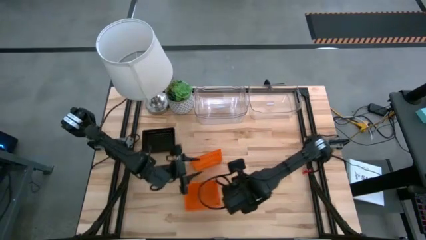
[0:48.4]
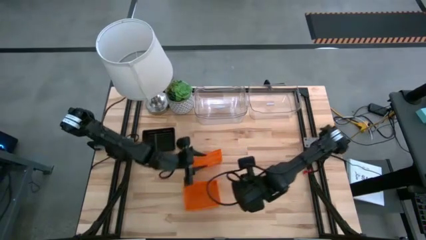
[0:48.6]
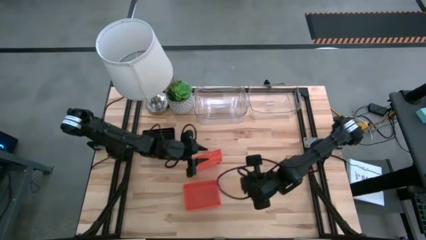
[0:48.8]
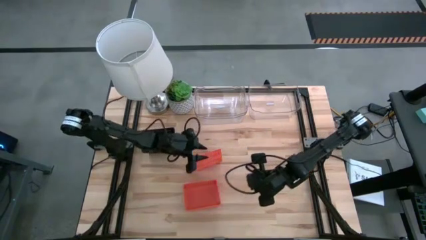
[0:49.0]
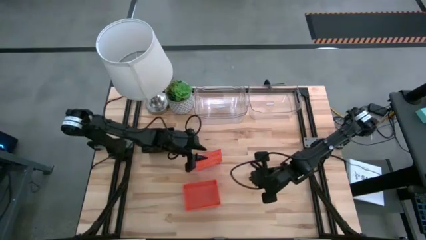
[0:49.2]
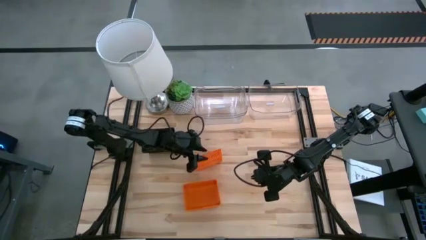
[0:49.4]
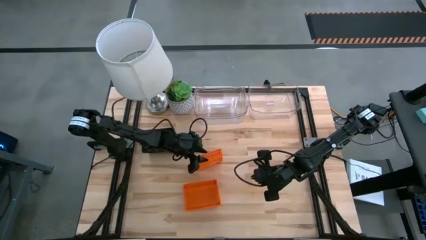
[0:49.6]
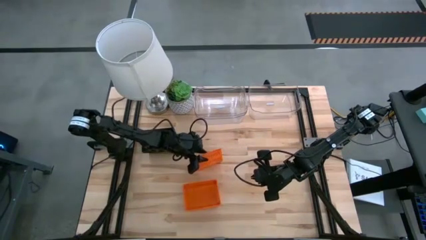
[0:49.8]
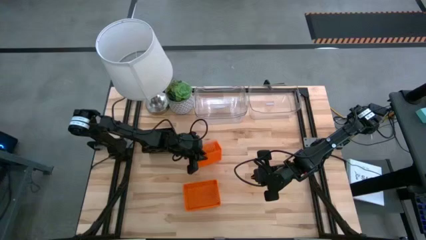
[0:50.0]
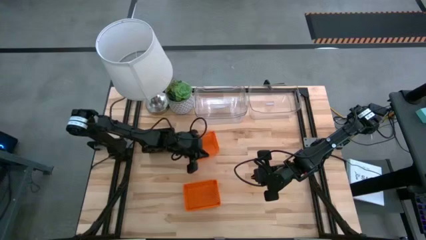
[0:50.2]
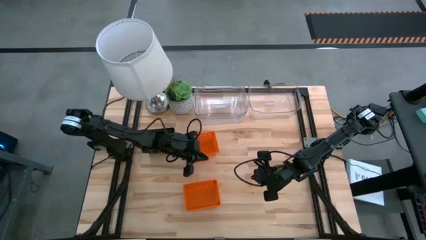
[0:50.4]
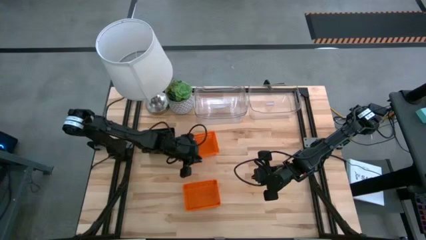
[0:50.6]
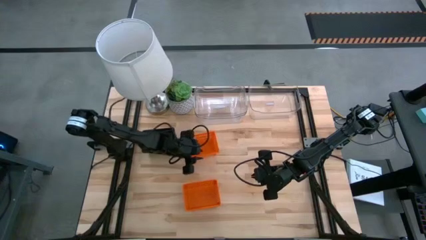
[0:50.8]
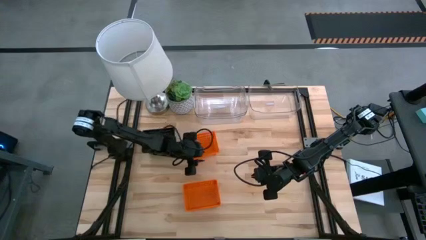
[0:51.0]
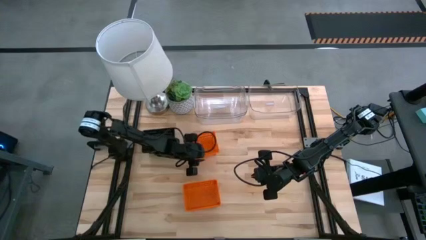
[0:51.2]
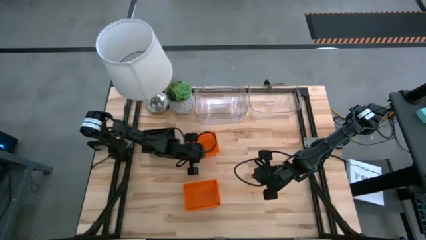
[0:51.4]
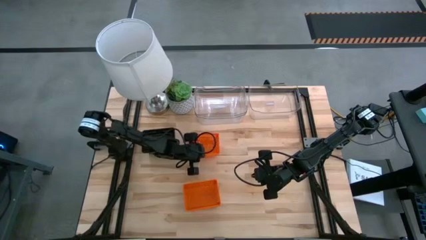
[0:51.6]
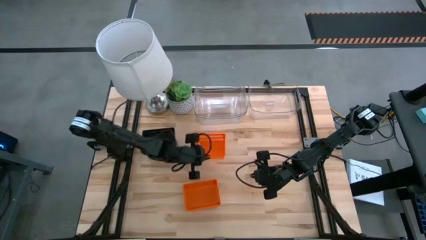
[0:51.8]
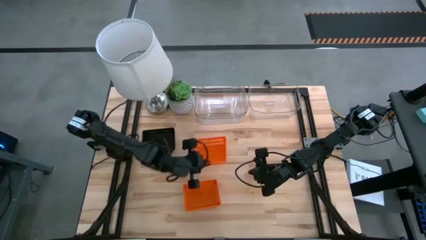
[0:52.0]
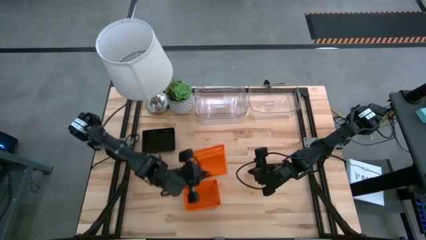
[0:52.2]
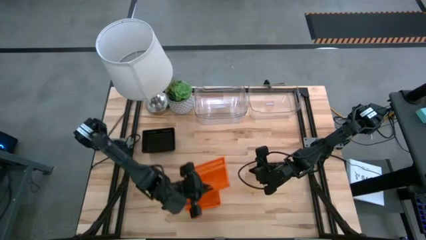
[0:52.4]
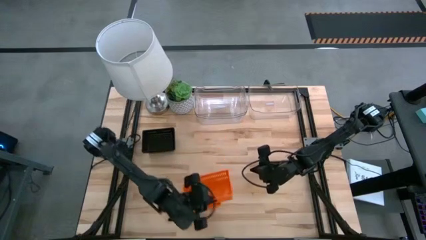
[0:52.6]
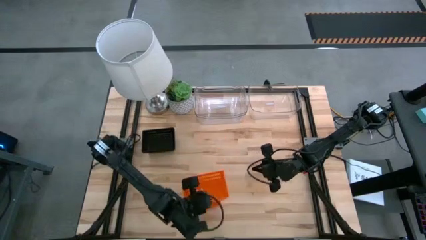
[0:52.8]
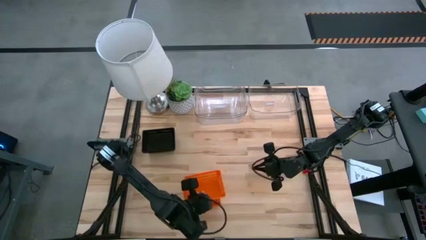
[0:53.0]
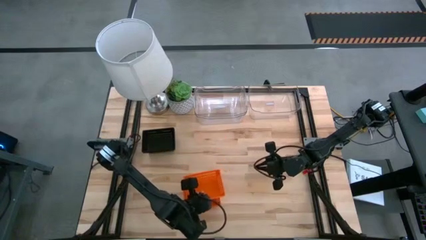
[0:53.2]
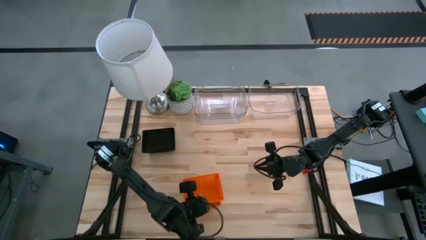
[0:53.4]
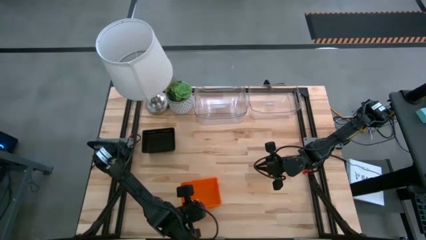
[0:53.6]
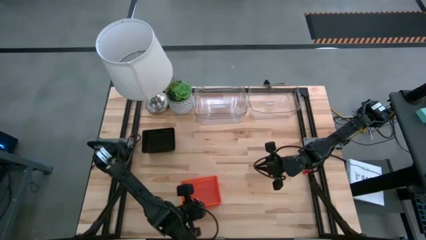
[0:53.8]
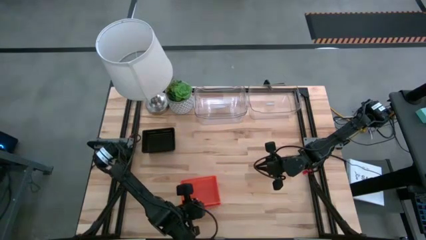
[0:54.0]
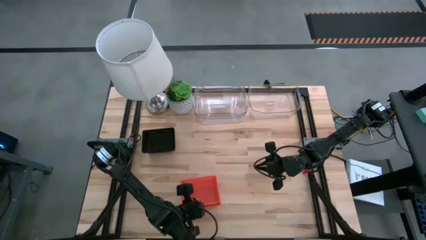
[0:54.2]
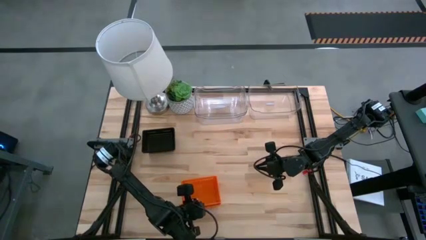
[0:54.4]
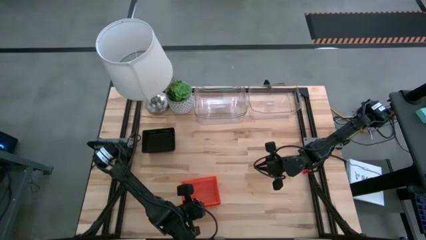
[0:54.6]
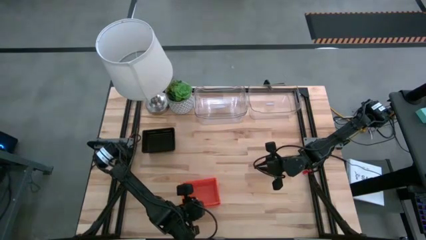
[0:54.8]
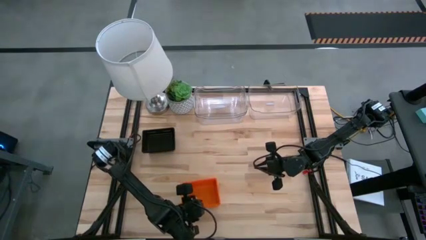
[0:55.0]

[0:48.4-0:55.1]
Stack the orange bin on the stacked orange bins

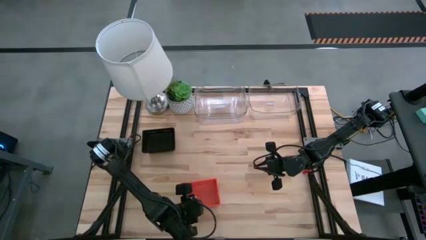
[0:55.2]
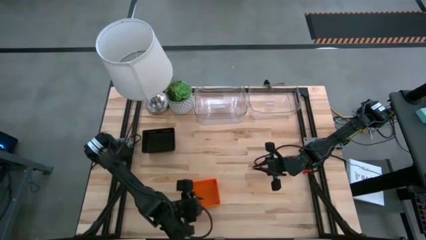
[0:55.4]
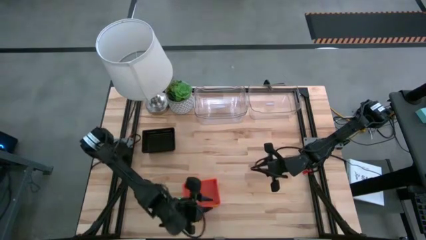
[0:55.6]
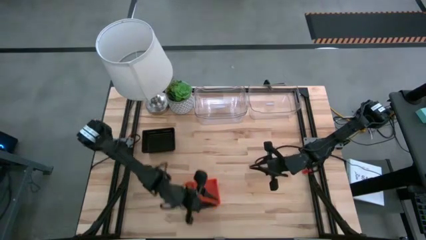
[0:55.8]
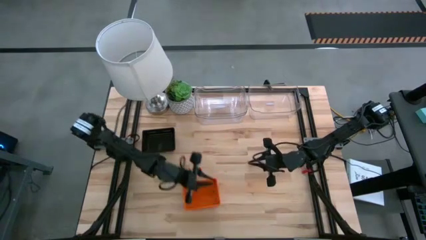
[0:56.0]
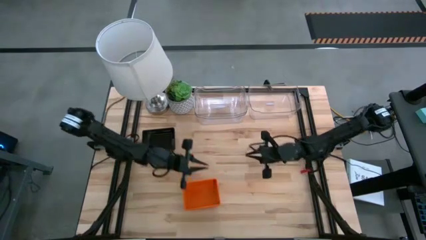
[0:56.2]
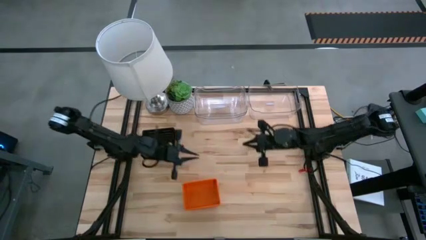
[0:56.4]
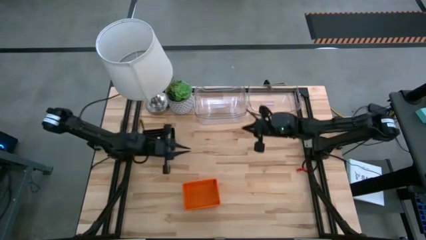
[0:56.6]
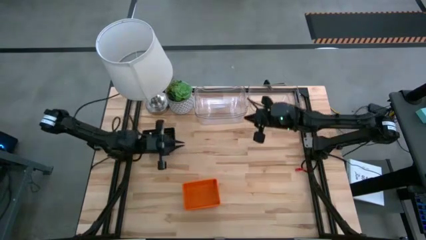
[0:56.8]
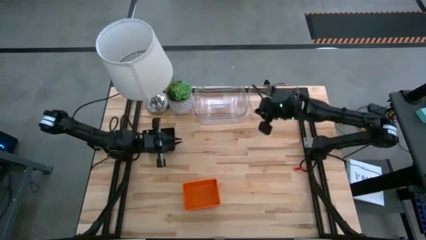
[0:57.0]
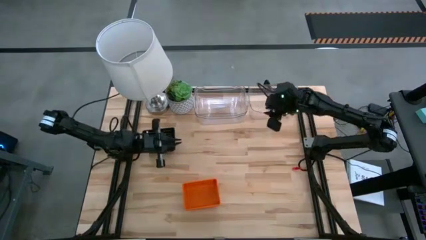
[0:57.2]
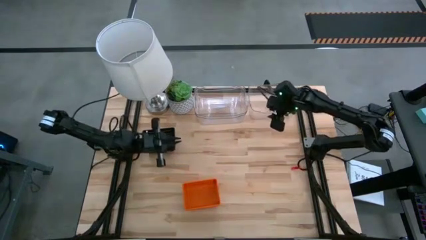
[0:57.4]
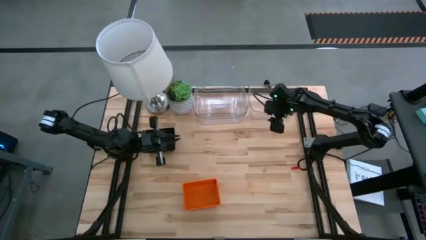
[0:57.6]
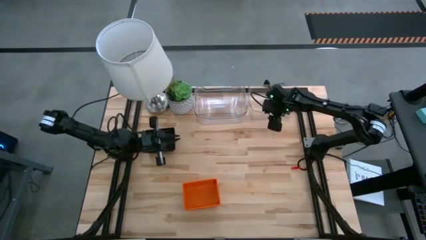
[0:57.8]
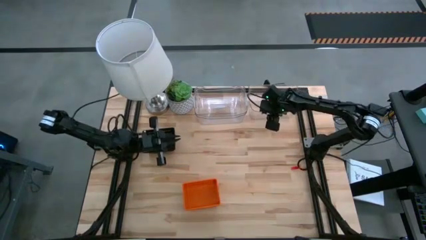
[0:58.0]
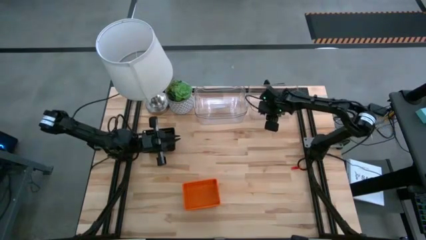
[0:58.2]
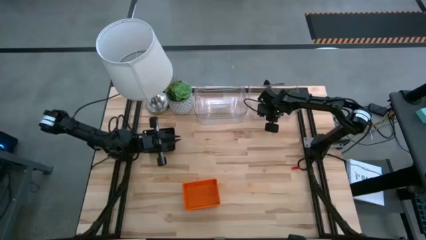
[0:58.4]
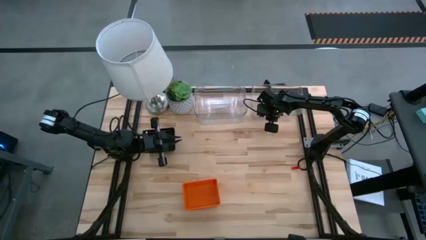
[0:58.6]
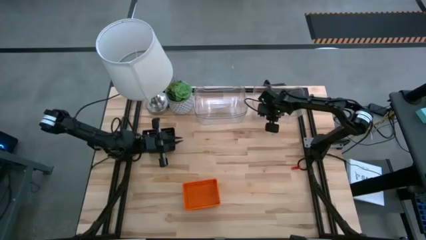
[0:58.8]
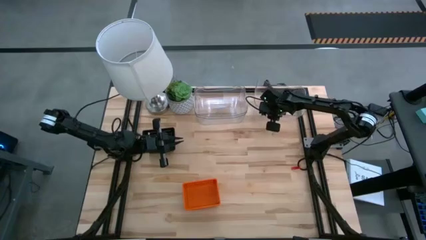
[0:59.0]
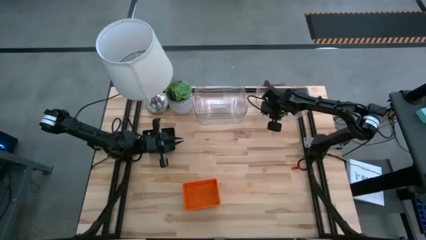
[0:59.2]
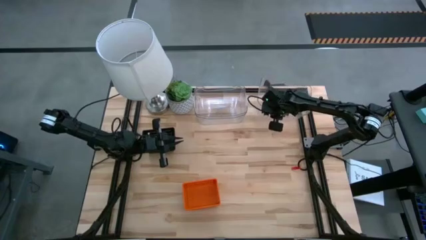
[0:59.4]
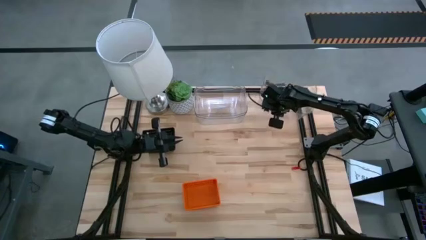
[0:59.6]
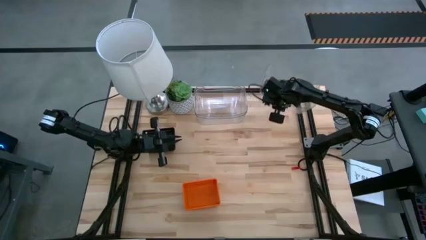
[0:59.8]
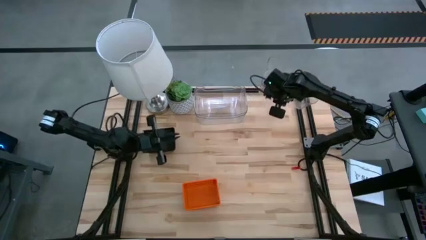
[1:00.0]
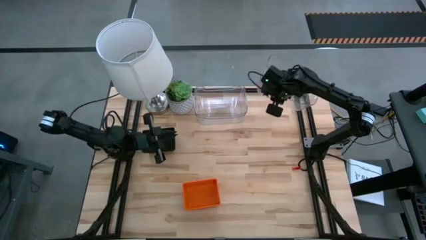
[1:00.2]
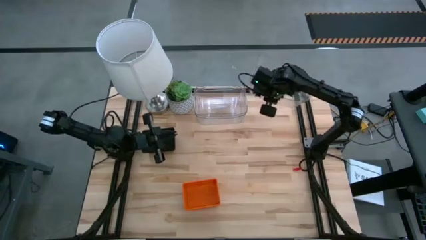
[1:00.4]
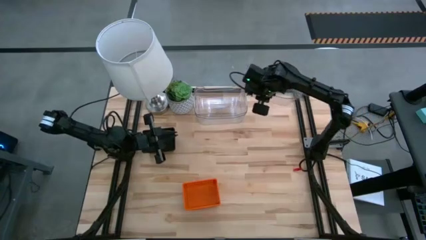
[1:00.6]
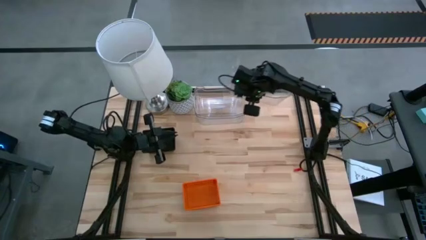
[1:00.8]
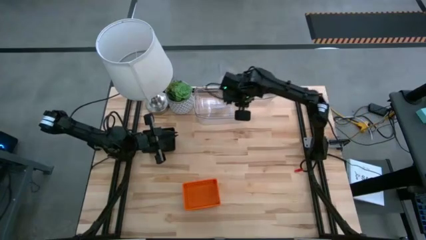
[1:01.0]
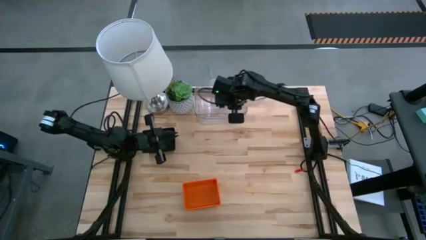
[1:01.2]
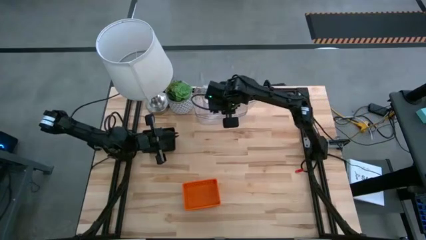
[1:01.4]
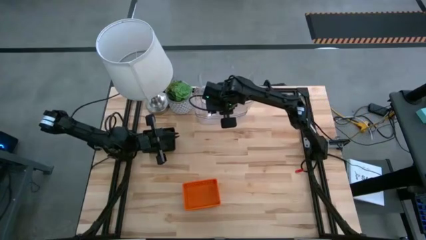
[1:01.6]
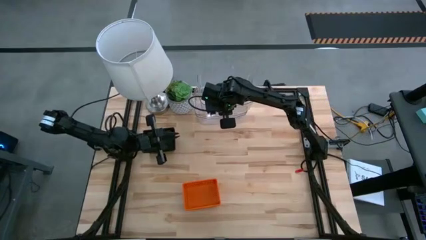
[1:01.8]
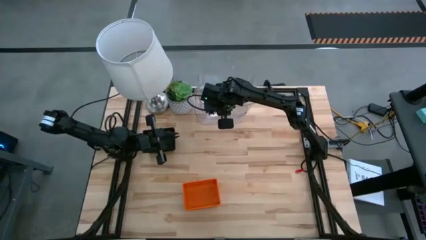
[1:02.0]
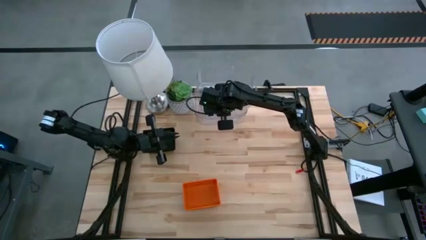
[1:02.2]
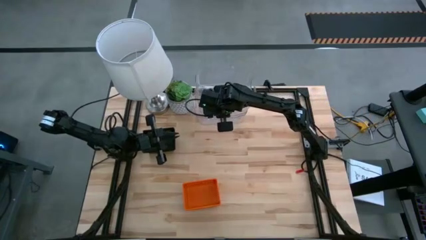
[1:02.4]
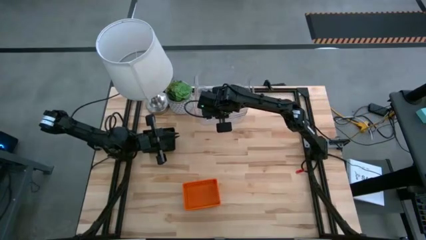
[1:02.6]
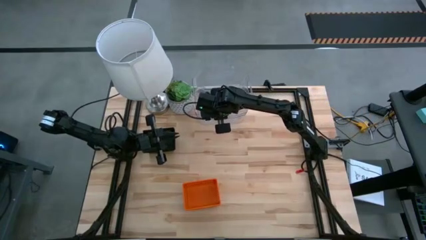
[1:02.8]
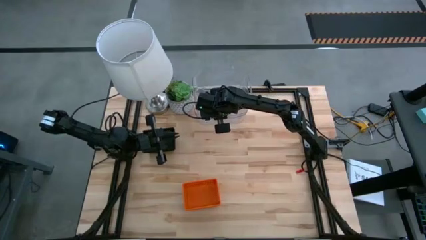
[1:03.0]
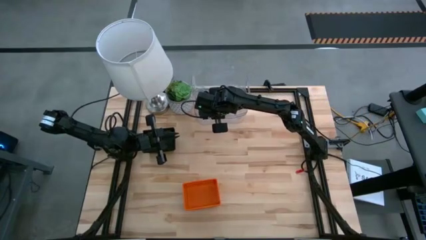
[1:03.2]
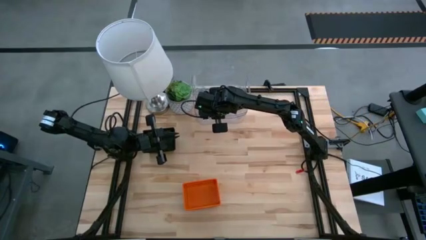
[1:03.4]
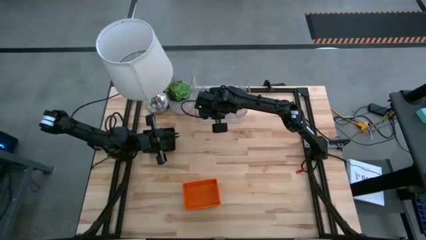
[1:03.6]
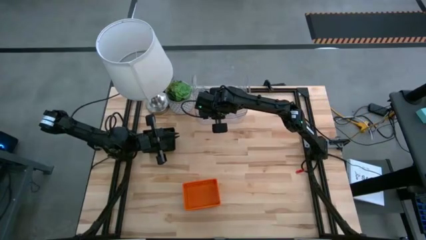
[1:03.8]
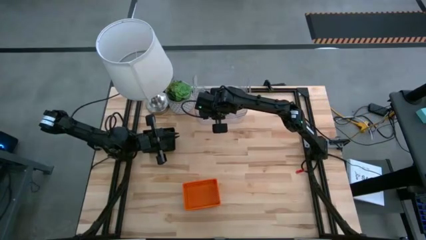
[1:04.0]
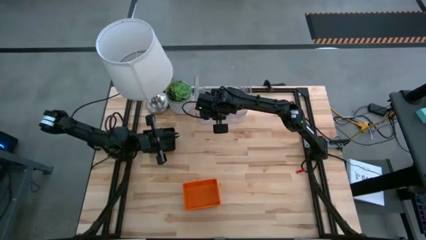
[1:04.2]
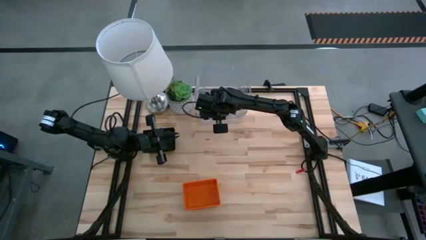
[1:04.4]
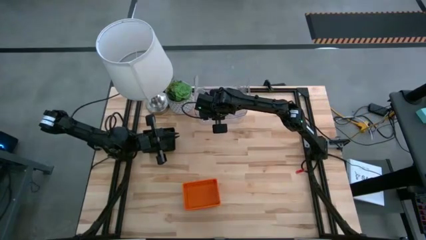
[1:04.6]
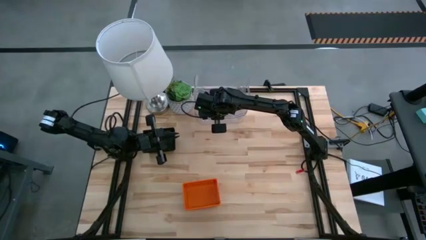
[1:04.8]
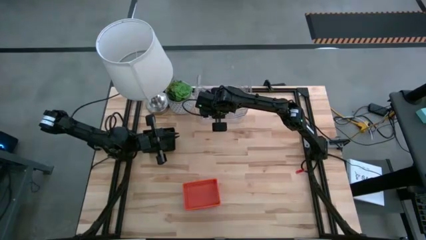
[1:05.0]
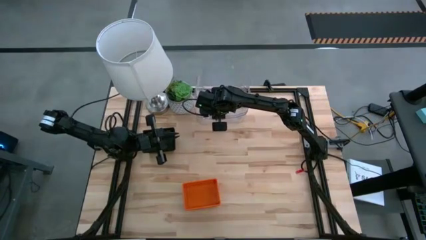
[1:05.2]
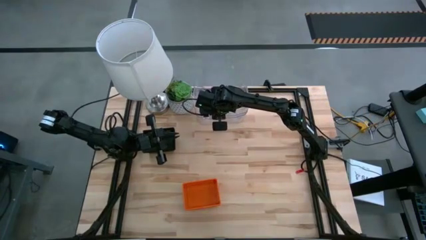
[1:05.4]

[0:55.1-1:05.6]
Stack the transparent bin on the stacked transparent bins

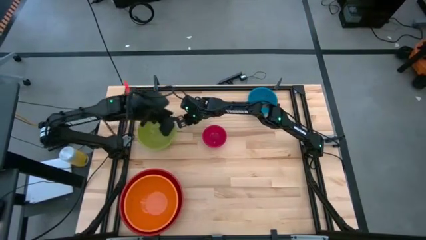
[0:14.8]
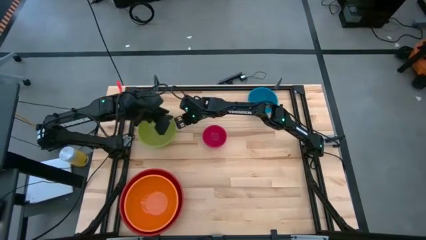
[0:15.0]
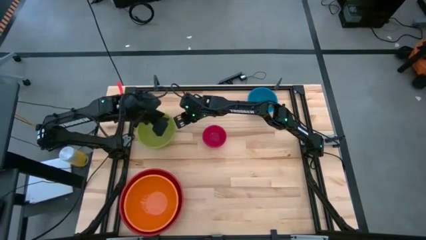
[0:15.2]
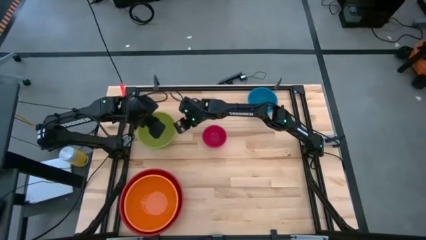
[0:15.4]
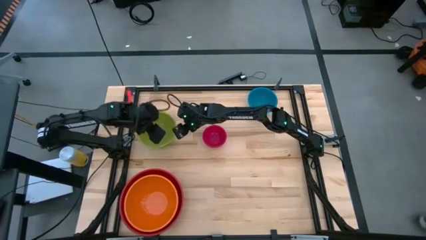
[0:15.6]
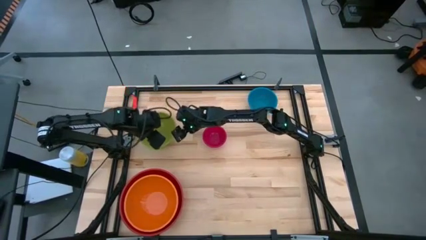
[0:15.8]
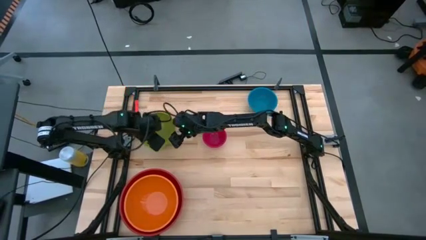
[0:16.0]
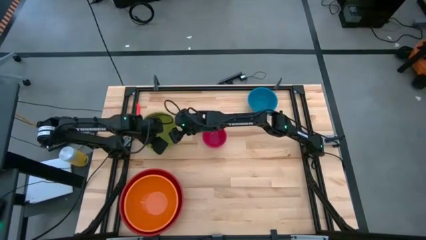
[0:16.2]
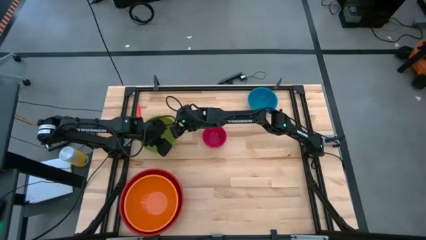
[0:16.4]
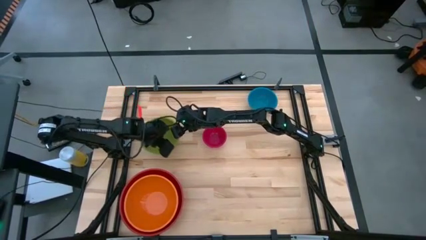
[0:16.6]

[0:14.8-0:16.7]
Stack the green bowl on top of the orange bowl
